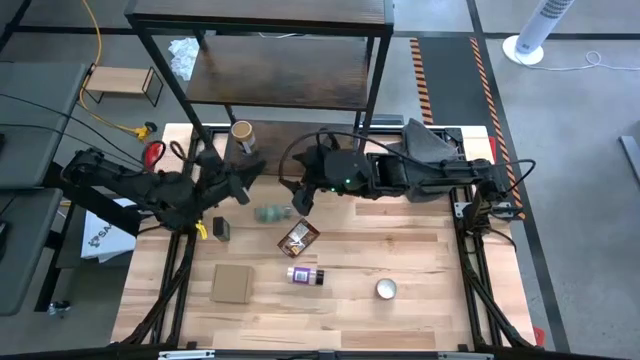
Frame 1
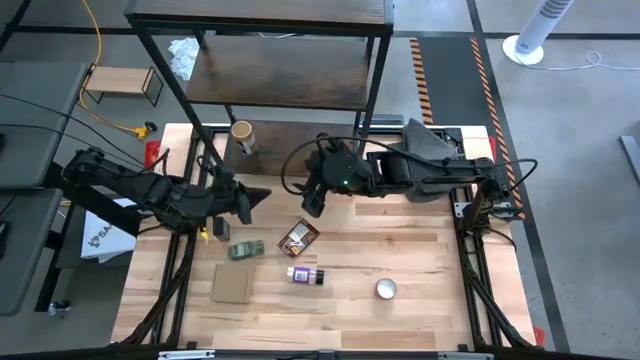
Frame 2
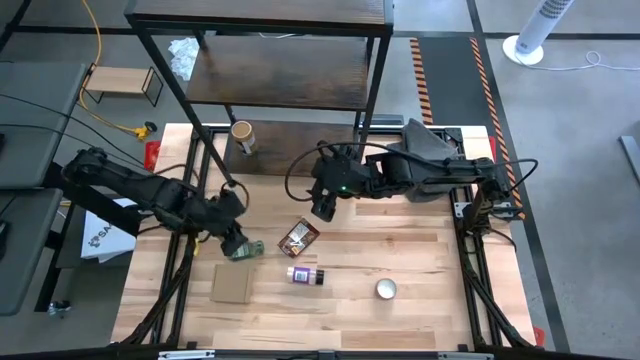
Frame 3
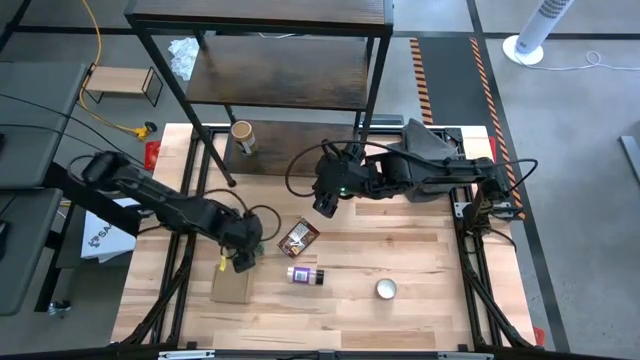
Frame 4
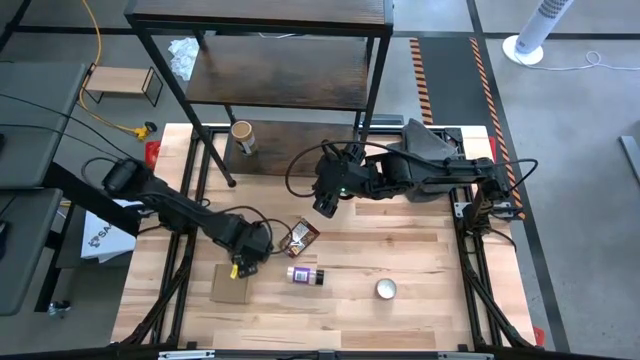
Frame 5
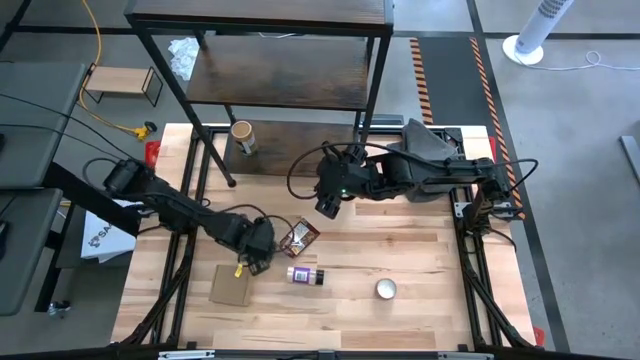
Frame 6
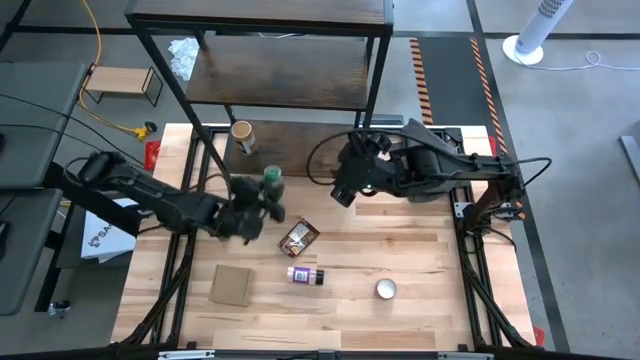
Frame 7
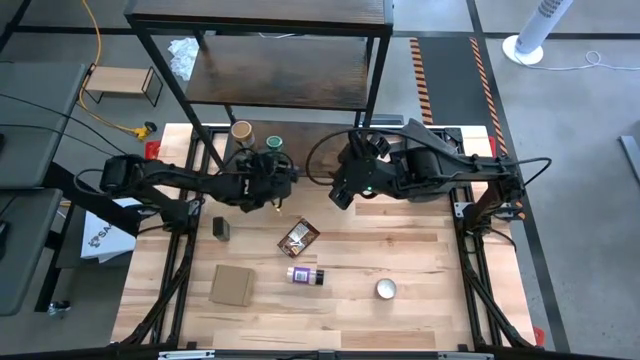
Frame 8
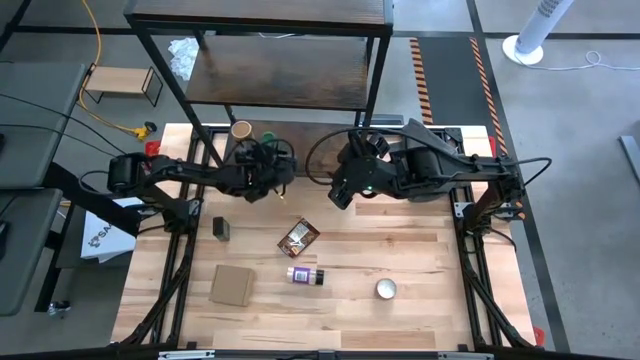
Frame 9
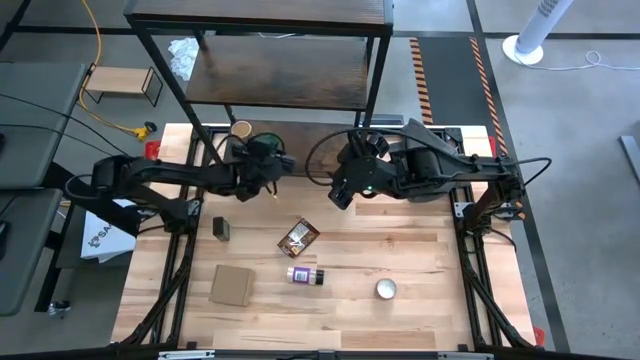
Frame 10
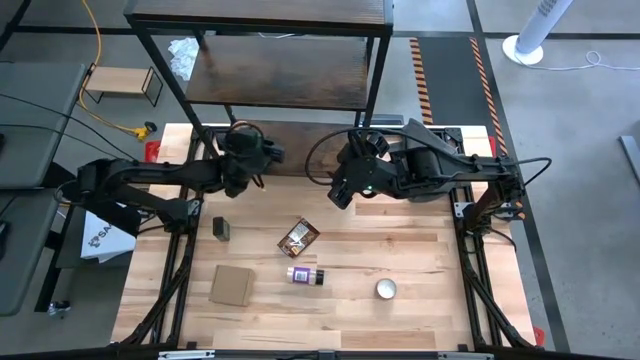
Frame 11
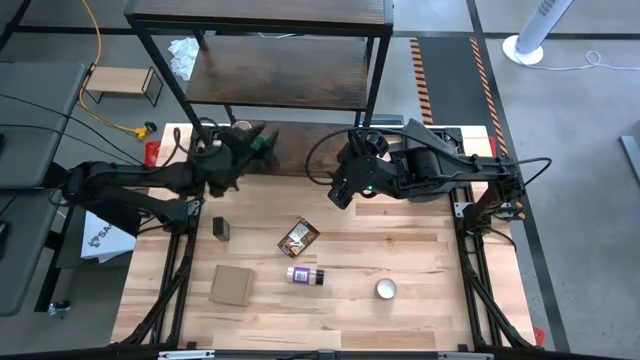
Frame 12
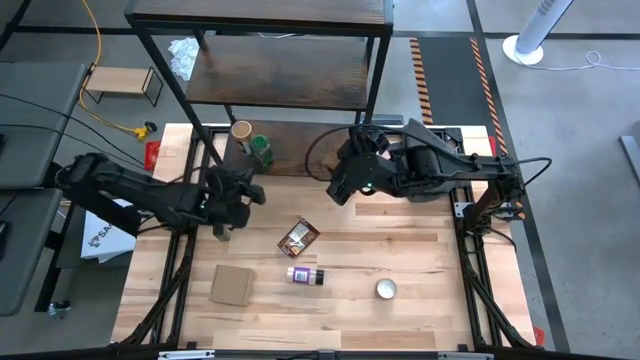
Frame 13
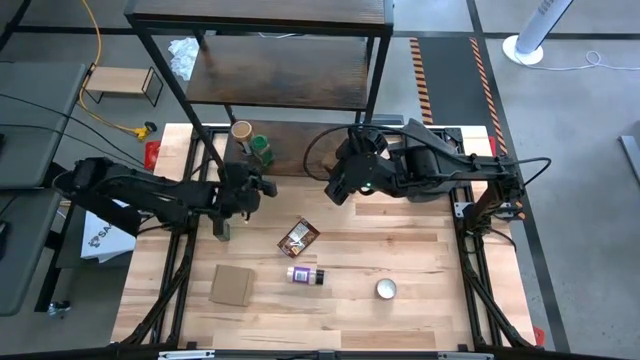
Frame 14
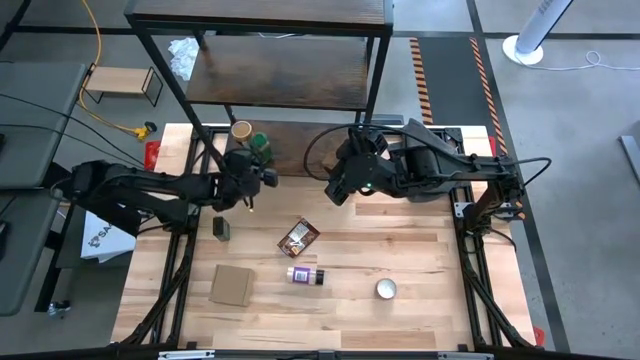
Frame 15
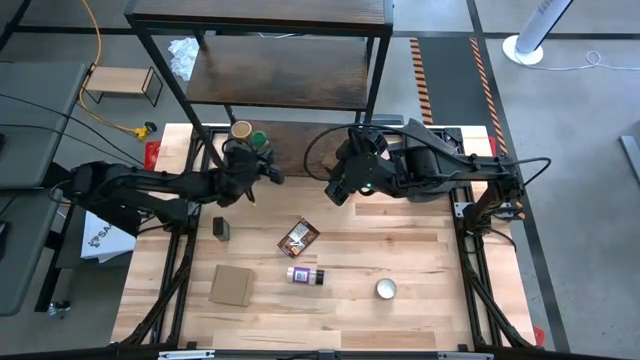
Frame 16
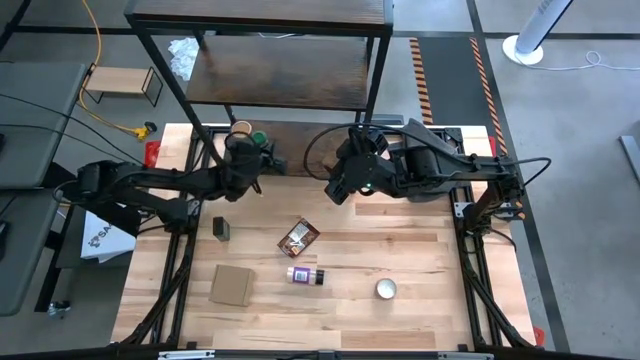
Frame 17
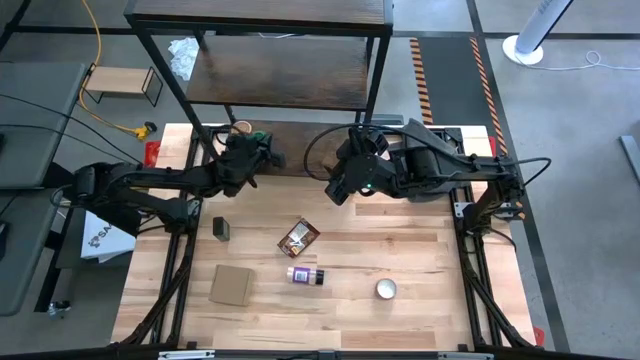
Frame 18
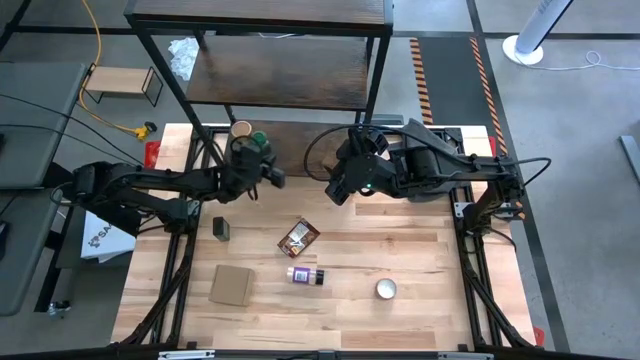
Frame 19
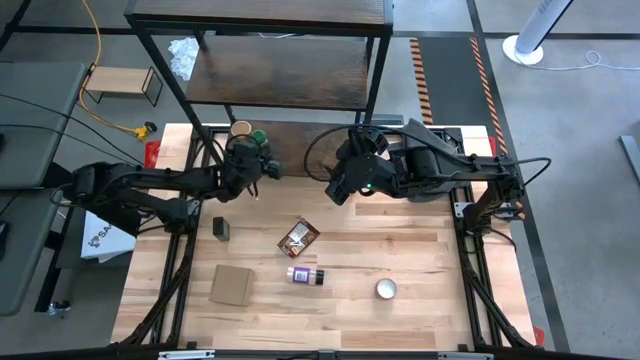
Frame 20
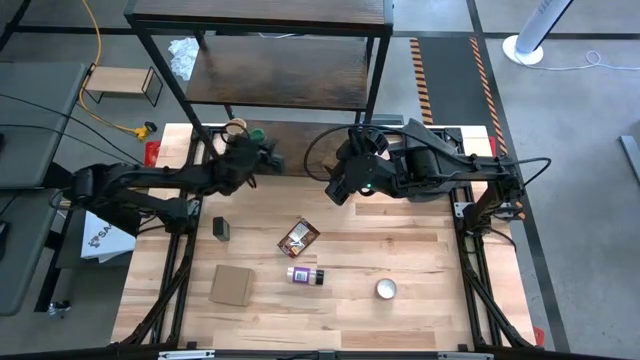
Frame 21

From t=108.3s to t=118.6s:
Task: Shelf spices
Put the green seasoning bottle on the shelf

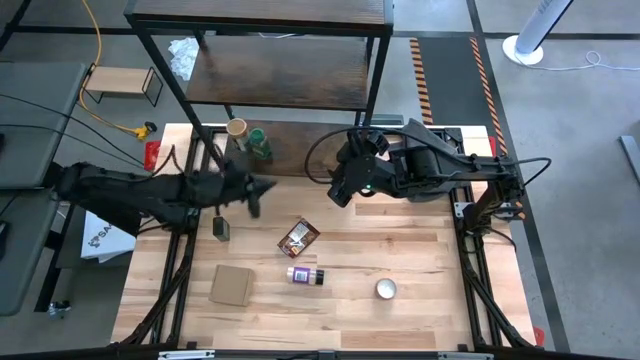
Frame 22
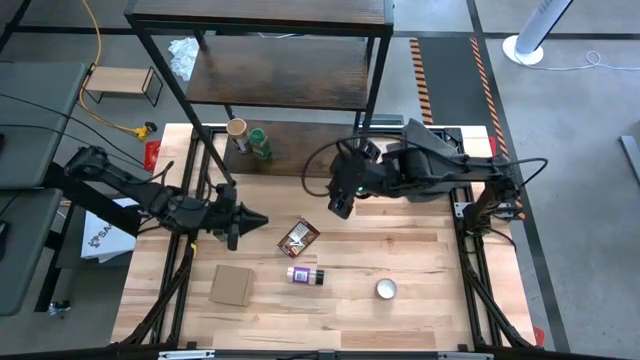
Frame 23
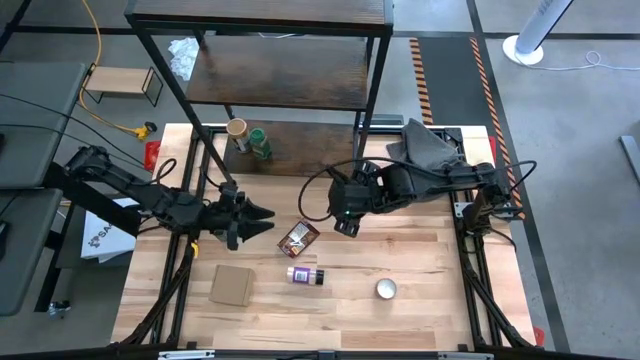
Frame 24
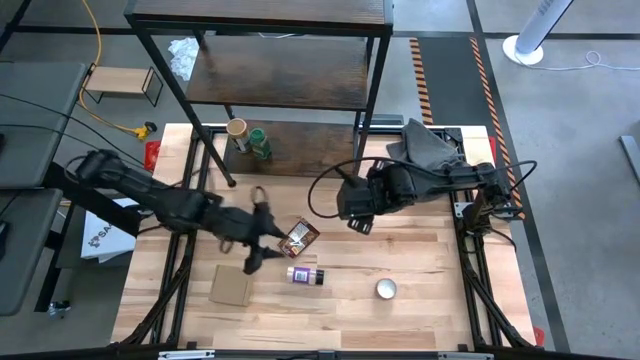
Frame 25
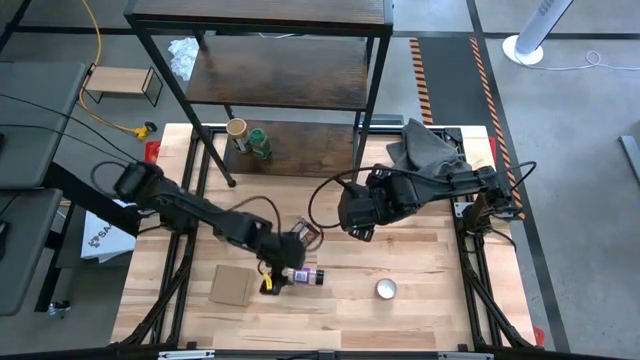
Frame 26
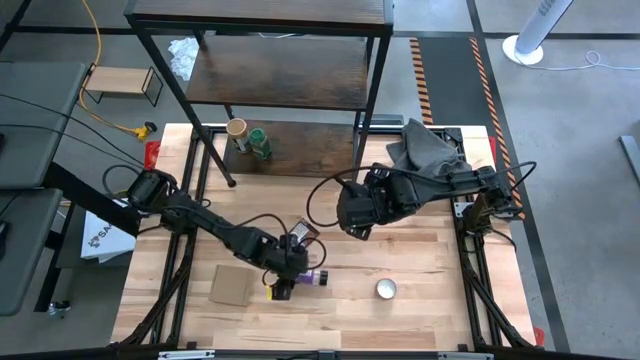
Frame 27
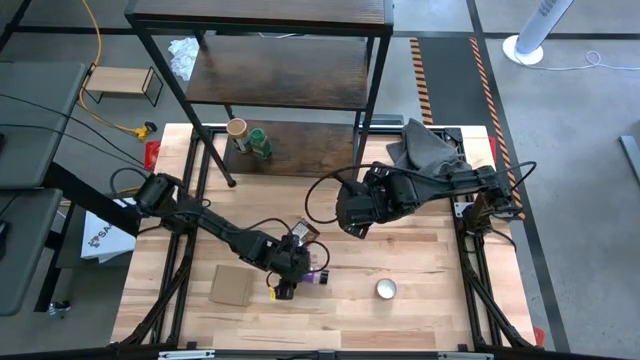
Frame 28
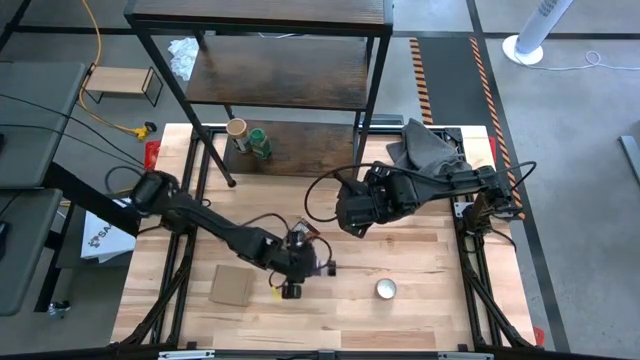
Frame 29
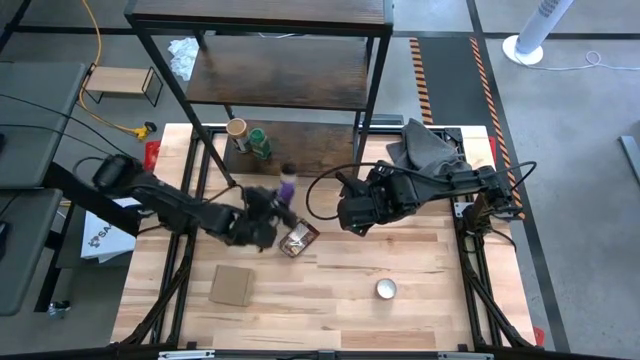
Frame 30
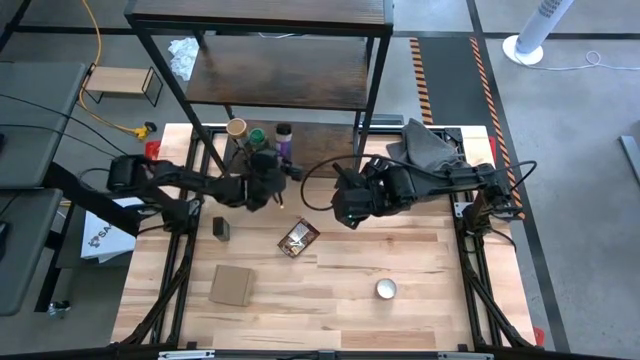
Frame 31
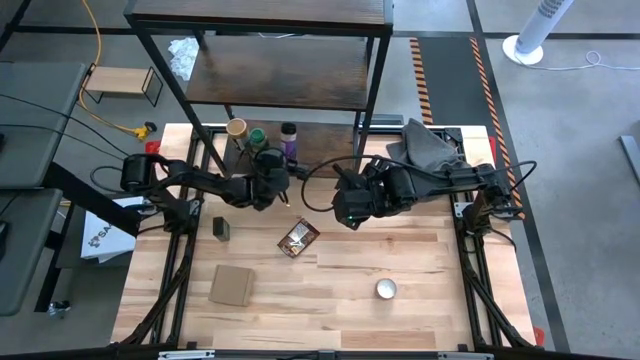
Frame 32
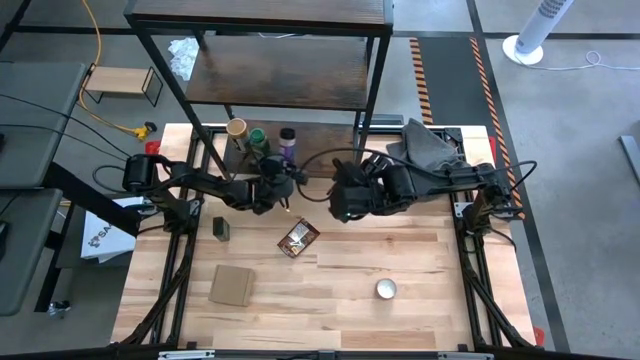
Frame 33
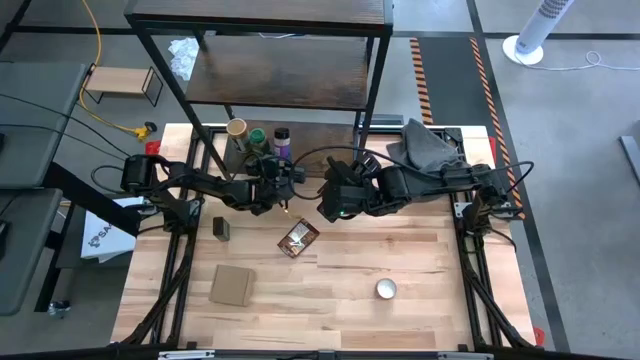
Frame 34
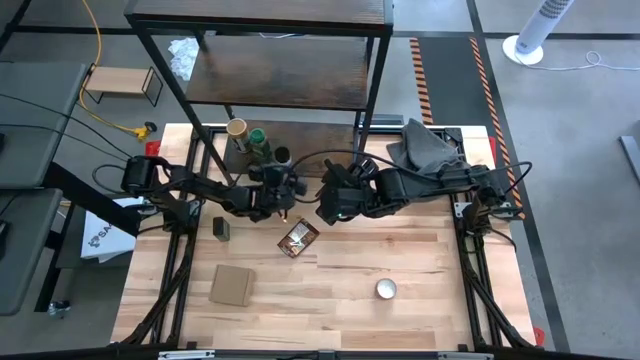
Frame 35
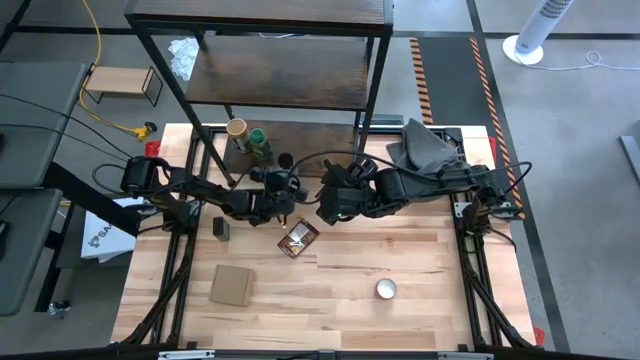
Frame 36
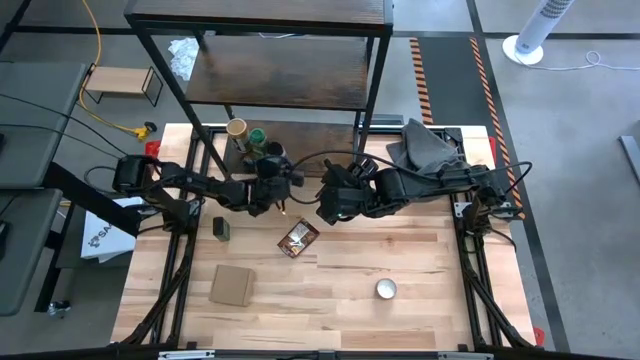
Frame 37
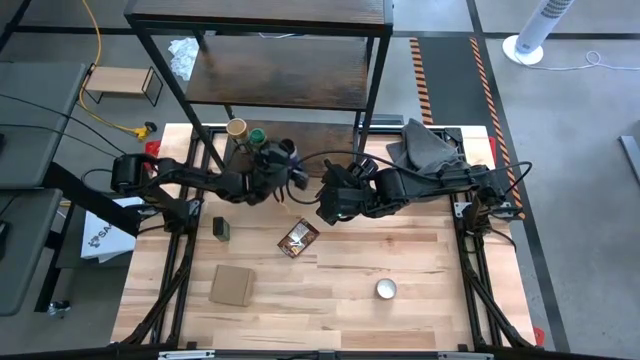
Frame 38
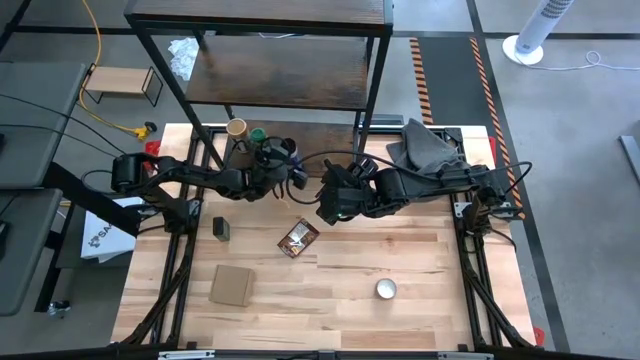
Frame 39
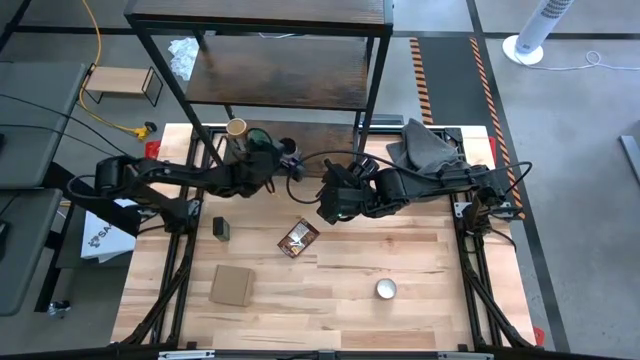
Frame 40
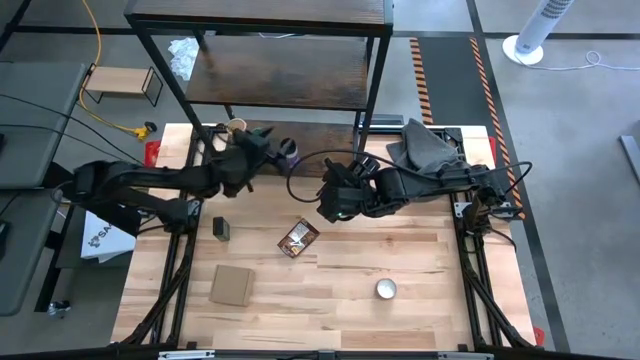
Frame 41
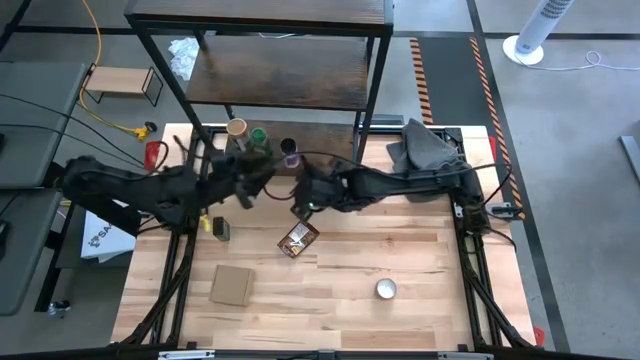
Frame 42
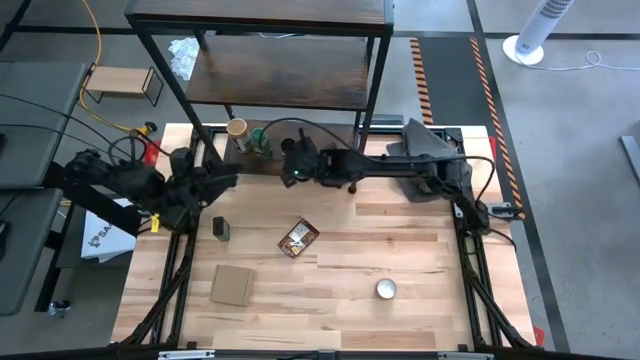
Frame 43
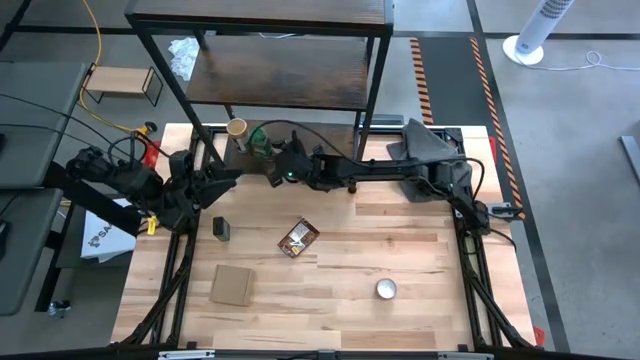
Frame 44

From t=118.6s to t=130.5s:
Put the black seasoning bottle on the shelf
